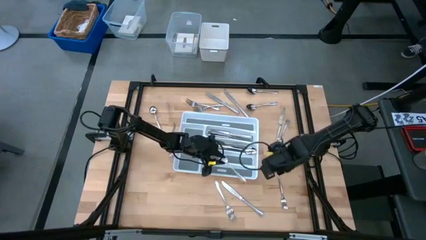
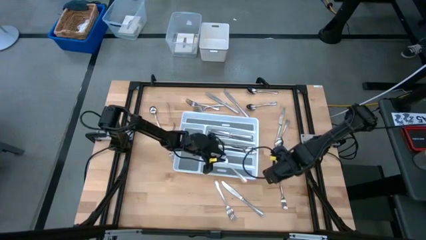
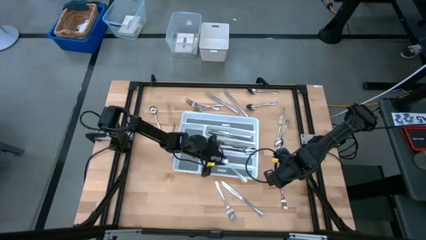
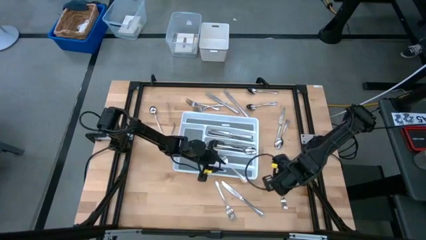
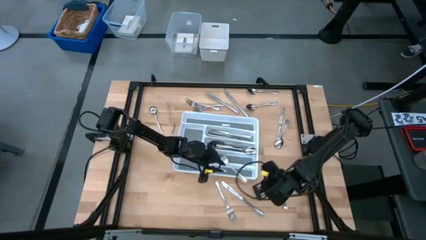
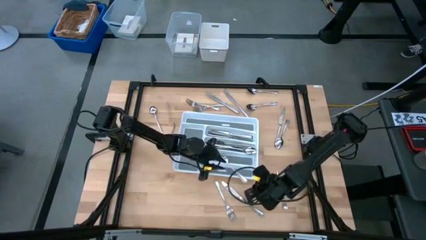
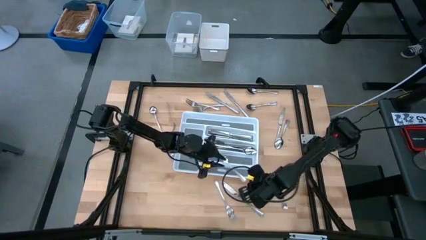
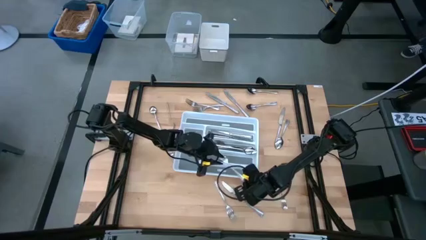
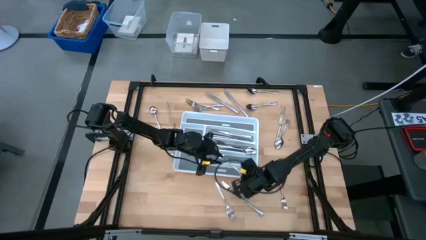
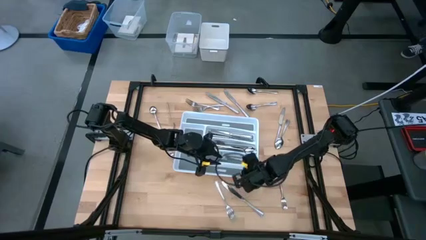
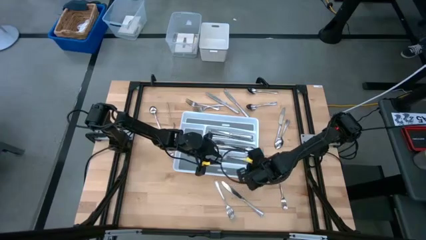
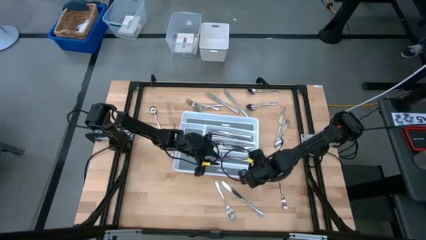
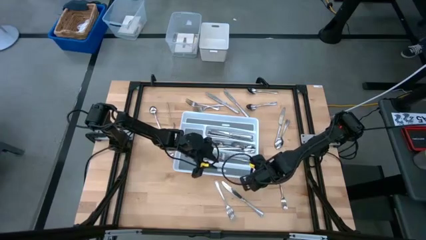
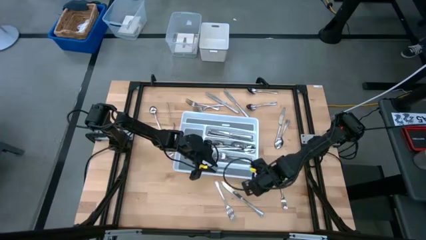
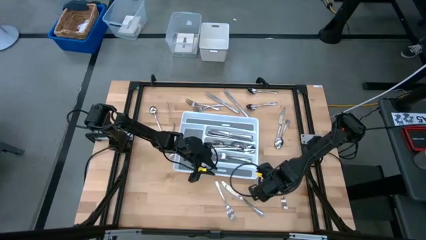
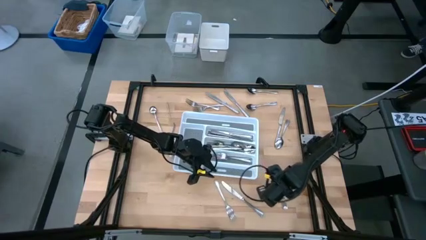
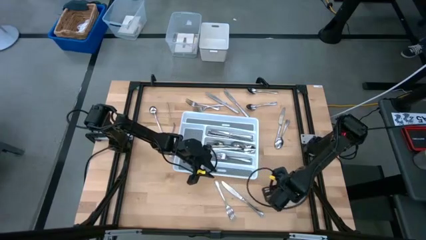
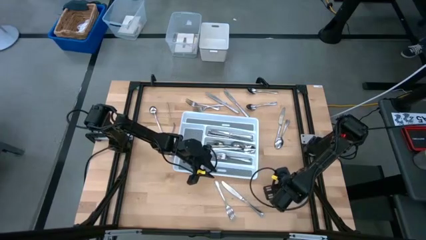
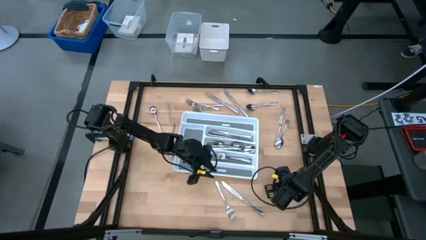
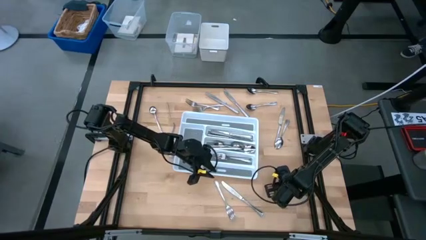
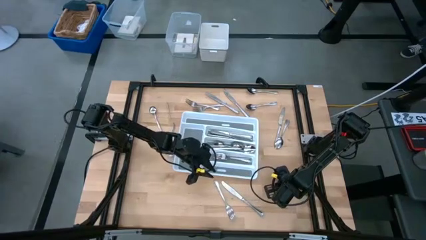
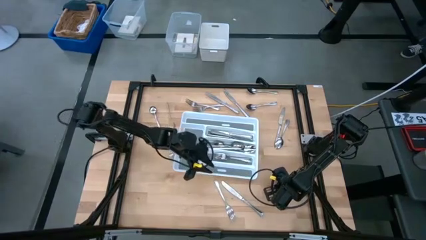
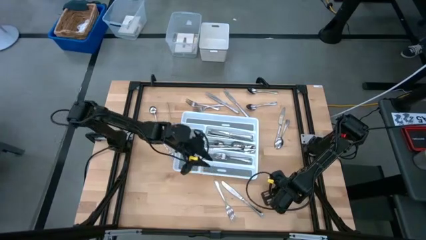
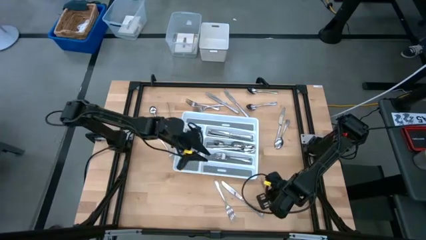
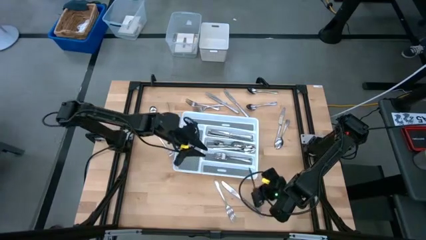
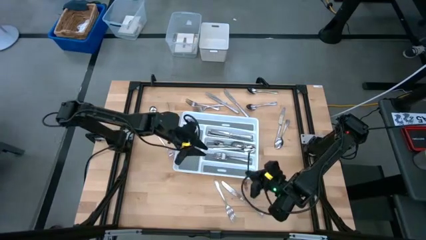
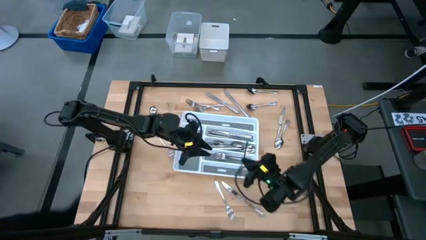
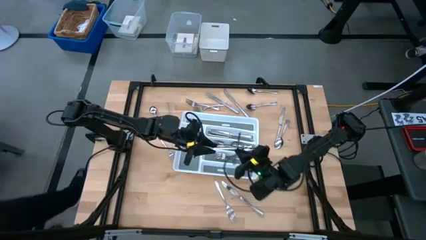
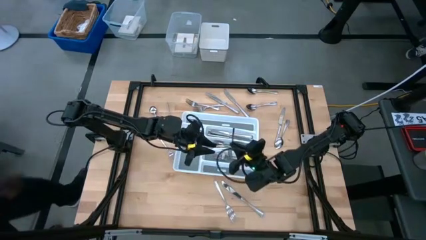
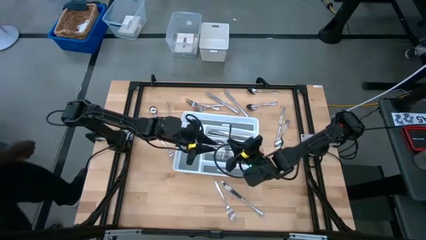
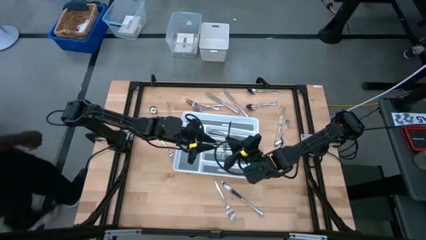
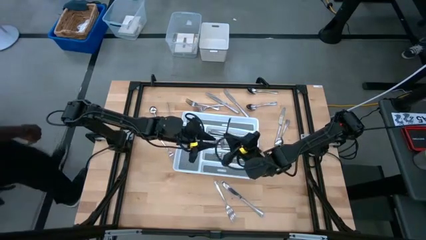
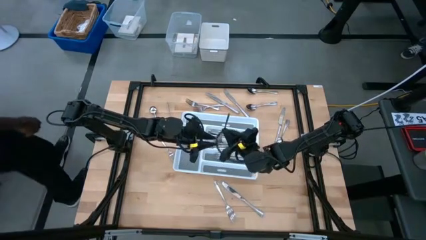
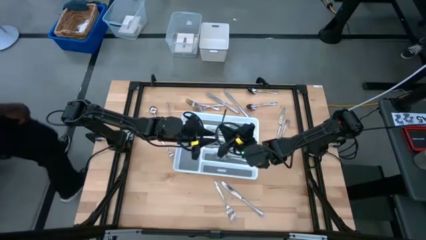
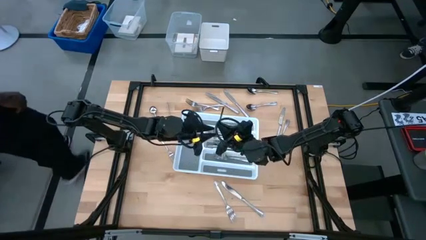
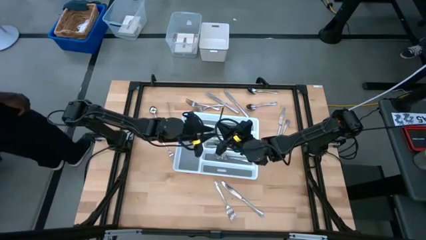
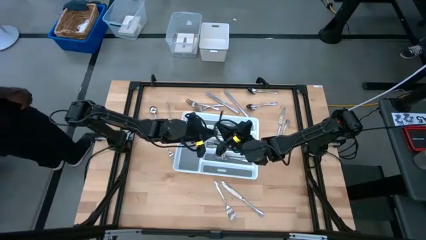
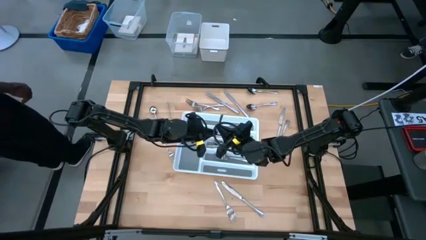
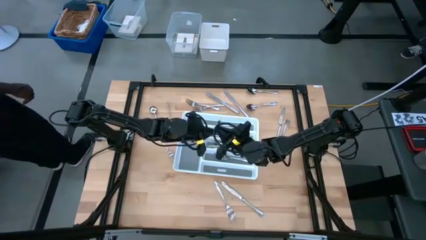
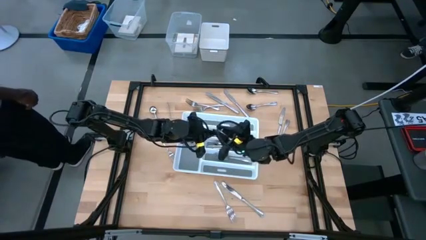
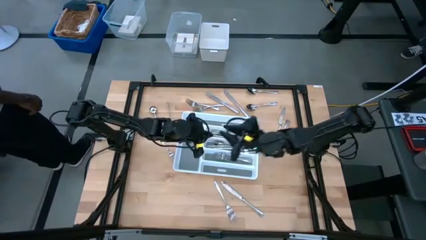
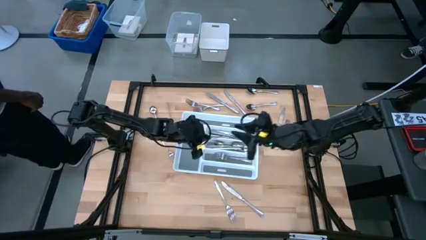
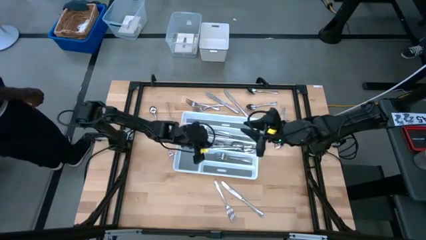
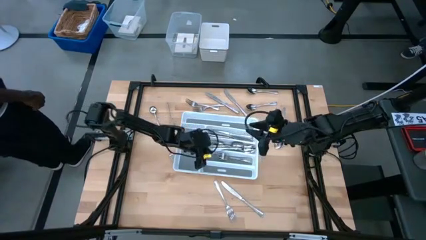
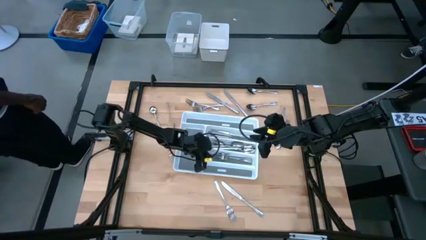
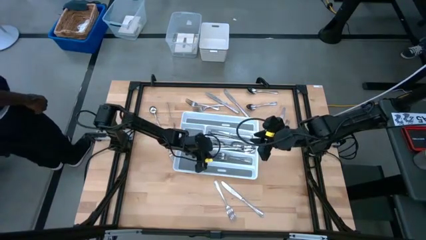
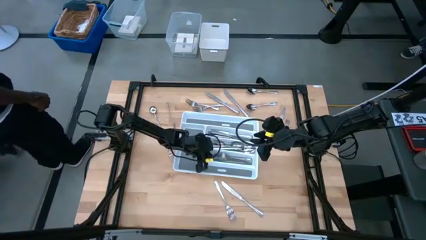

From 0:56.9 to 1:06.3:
Task: Sort silverware
Put the fork into the organizer tray

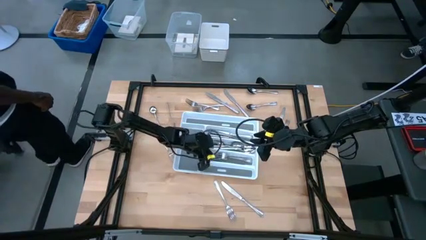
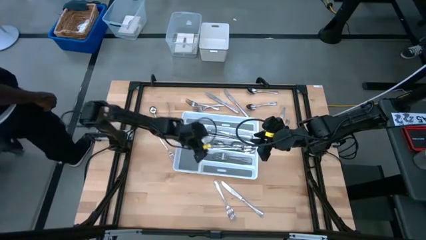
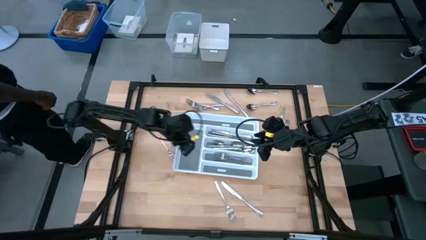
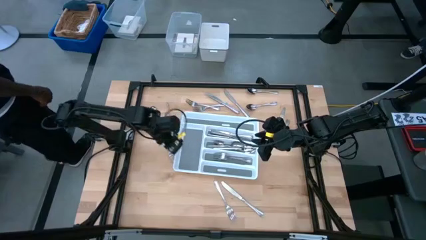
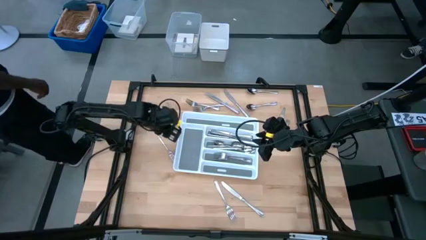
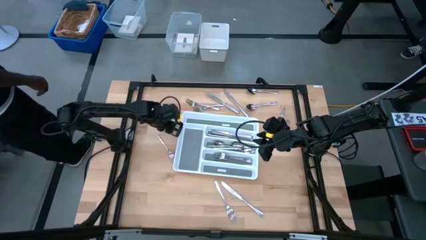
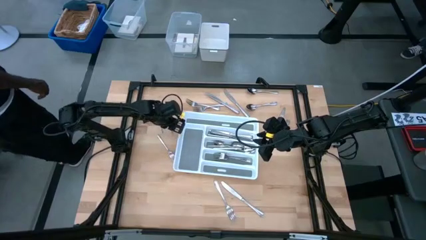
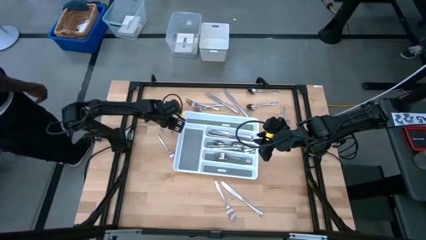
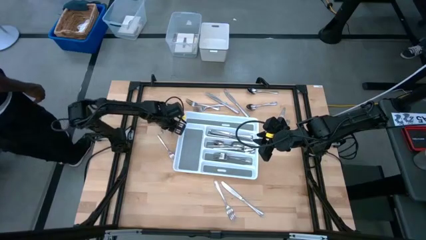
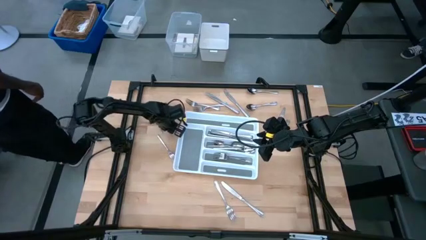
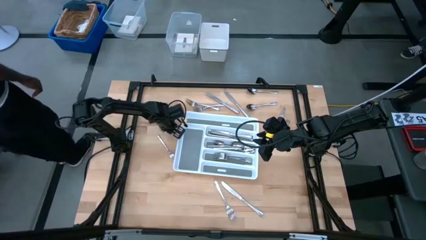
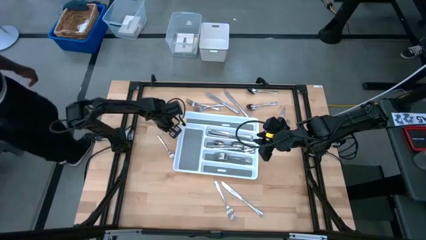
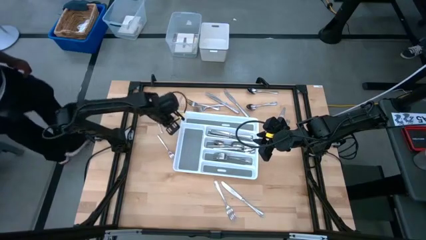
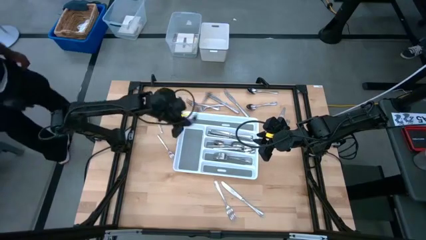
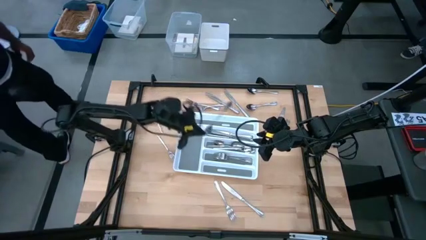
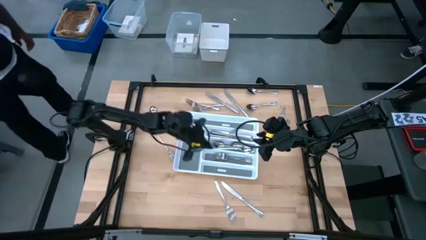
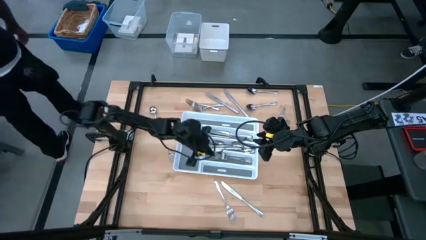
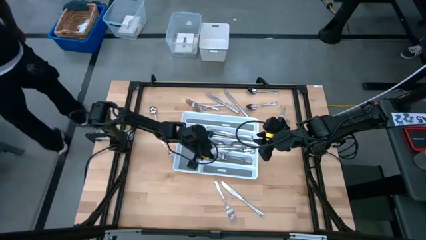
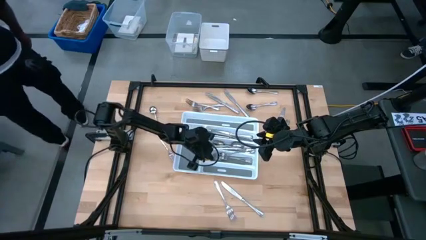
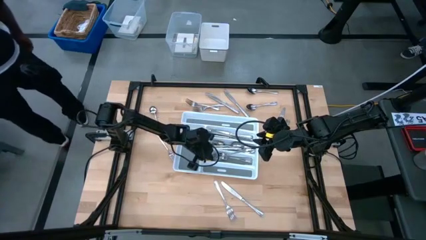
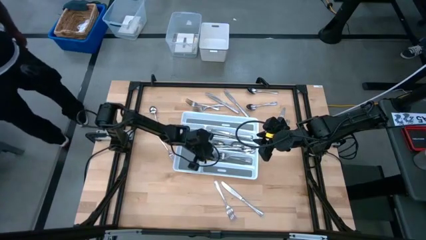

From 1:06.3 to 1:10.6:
Put the fork into the organizer tray
